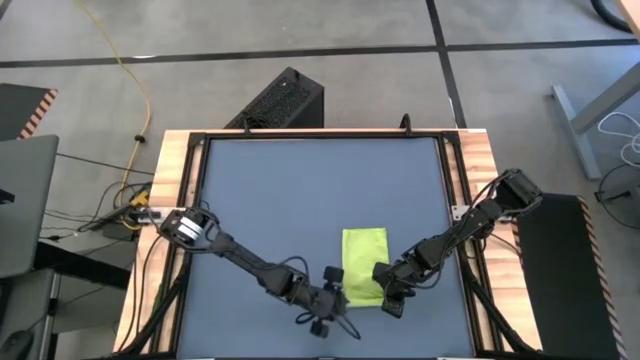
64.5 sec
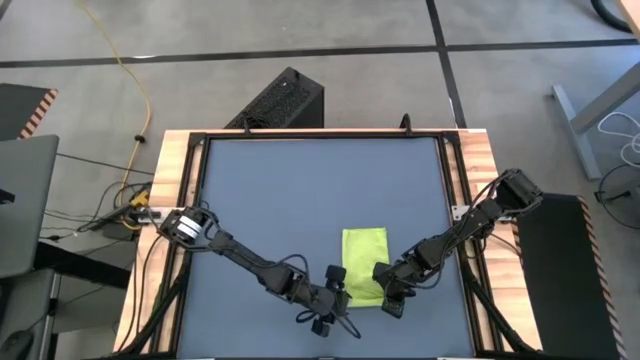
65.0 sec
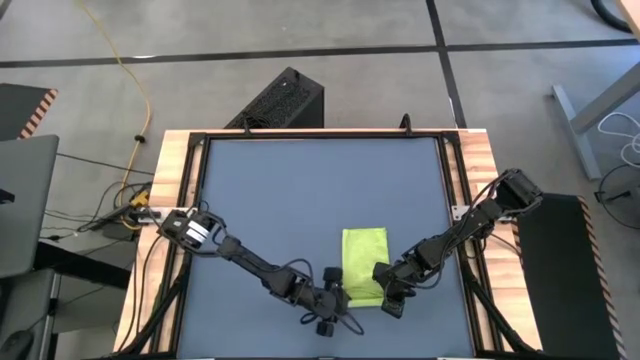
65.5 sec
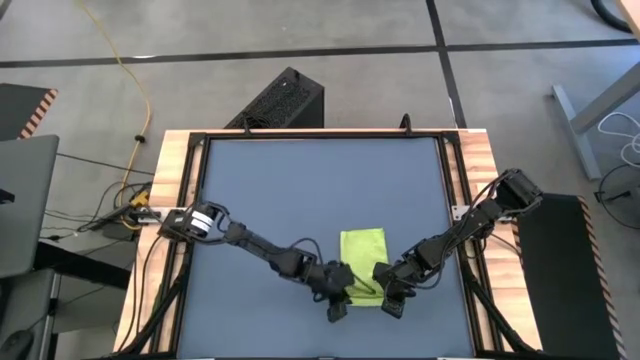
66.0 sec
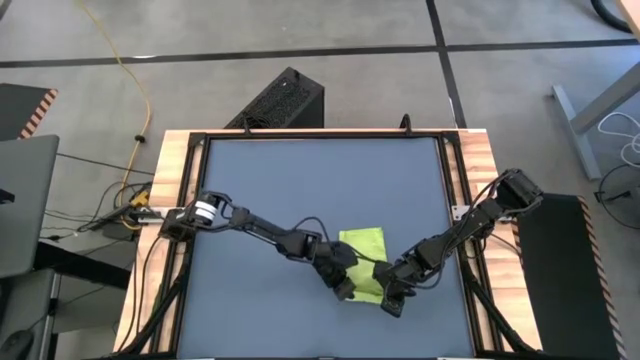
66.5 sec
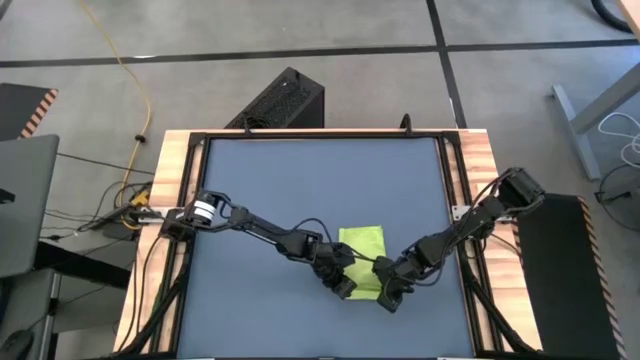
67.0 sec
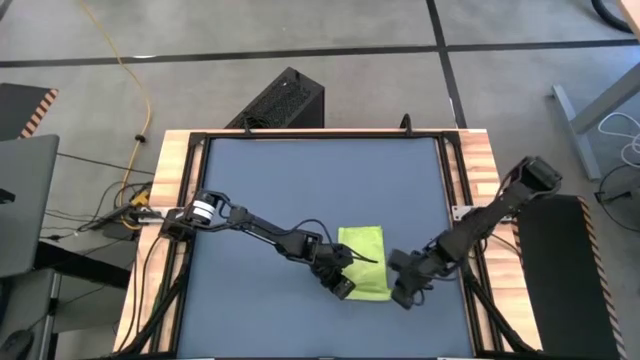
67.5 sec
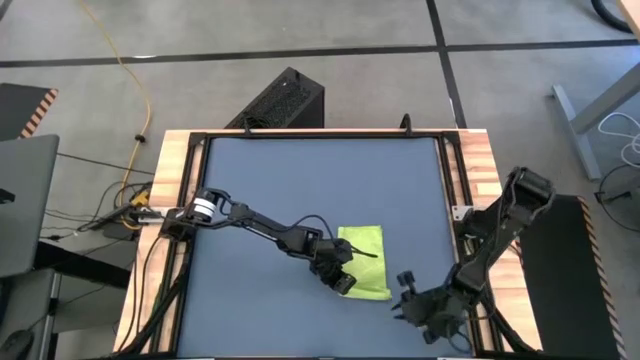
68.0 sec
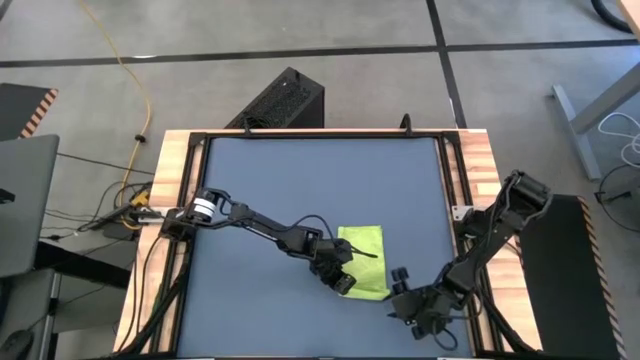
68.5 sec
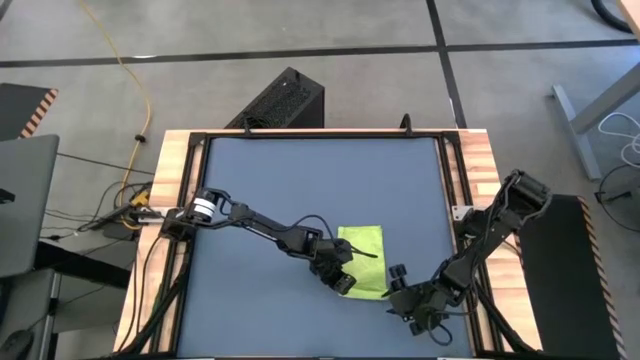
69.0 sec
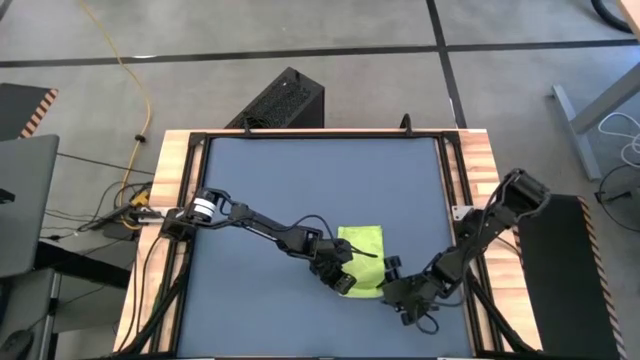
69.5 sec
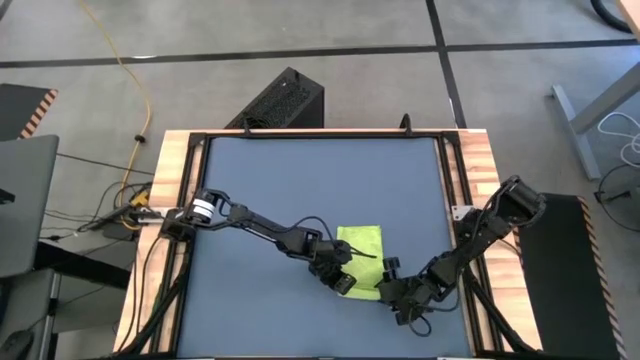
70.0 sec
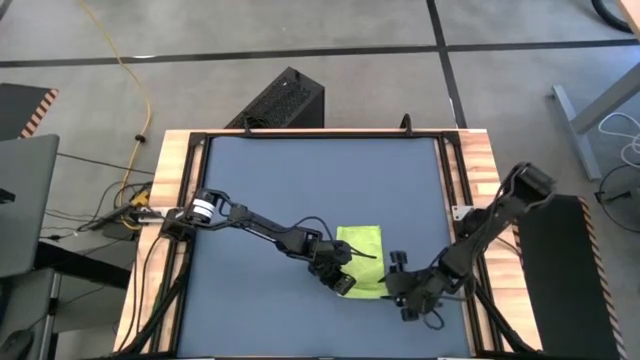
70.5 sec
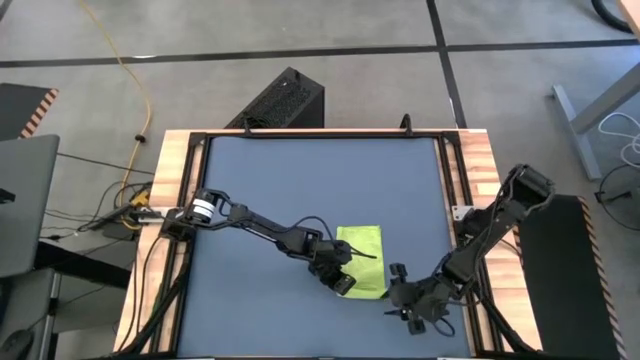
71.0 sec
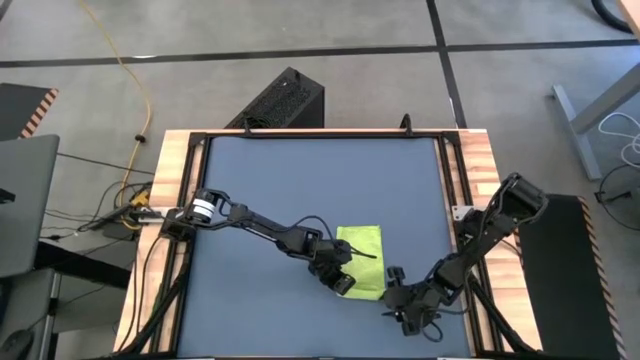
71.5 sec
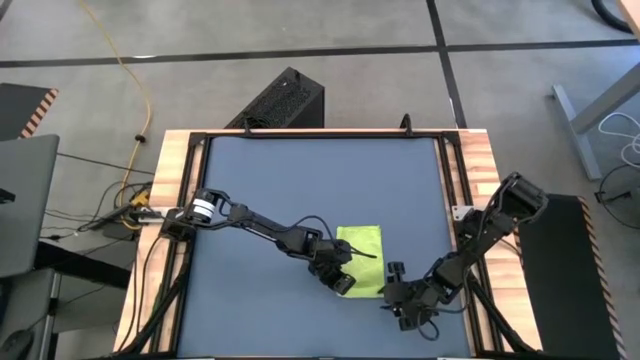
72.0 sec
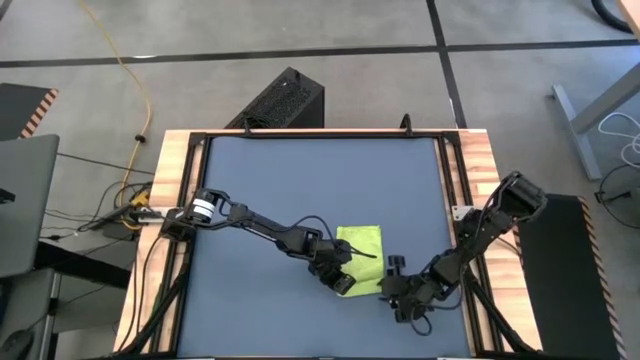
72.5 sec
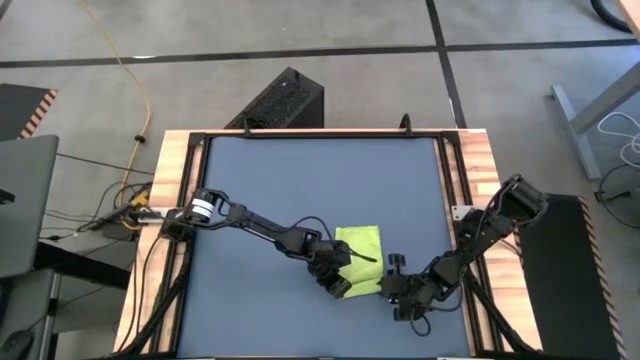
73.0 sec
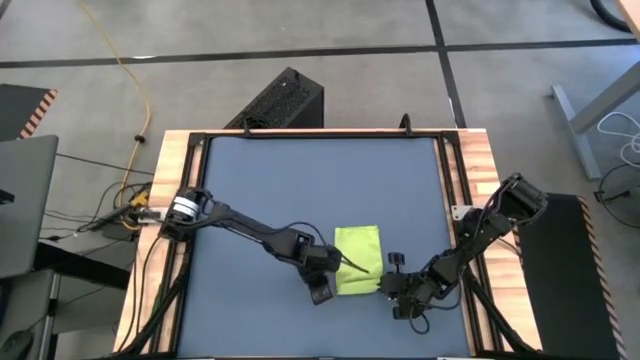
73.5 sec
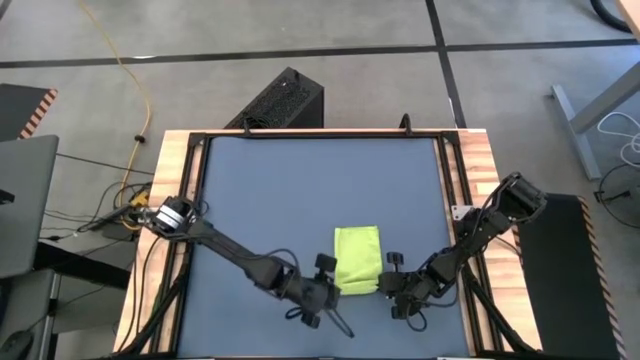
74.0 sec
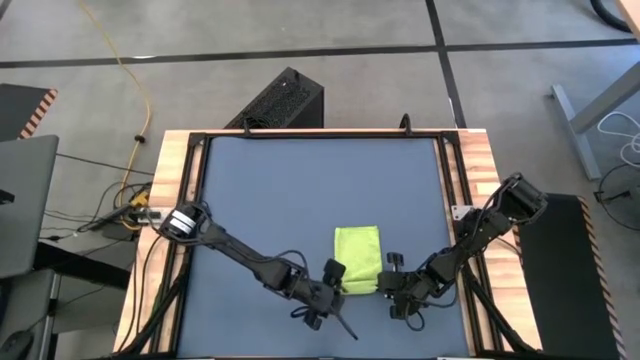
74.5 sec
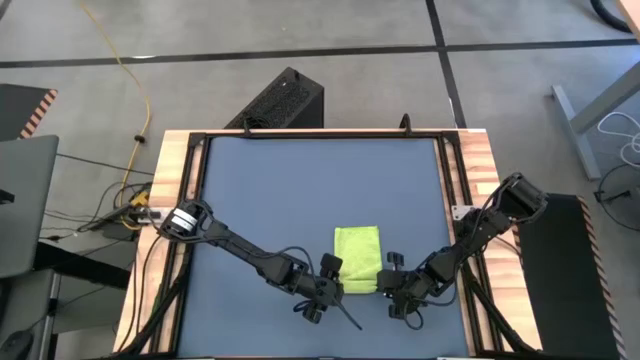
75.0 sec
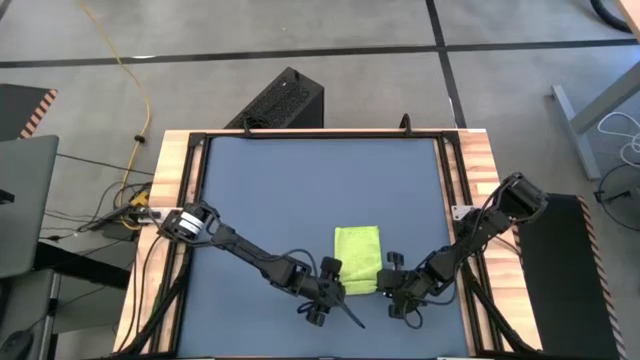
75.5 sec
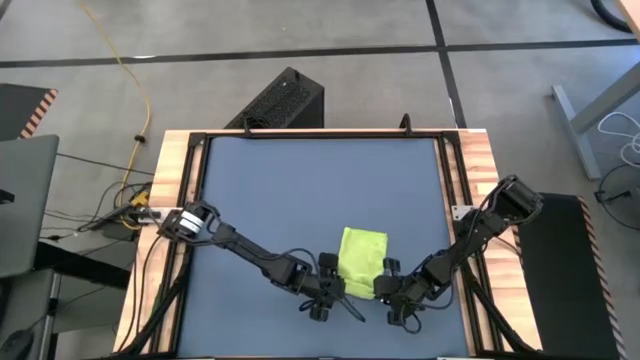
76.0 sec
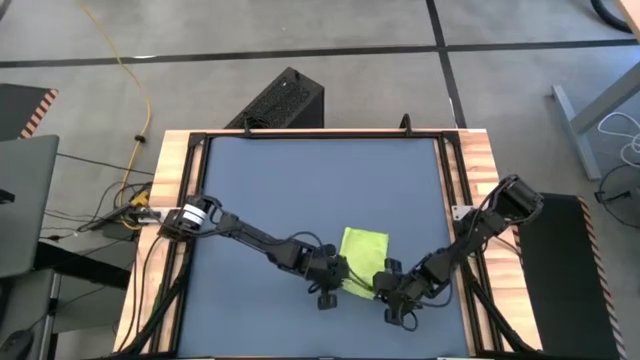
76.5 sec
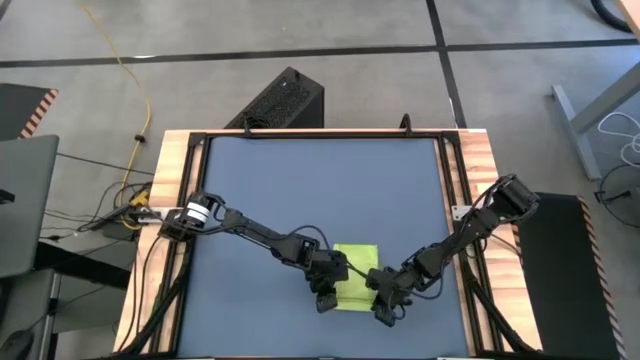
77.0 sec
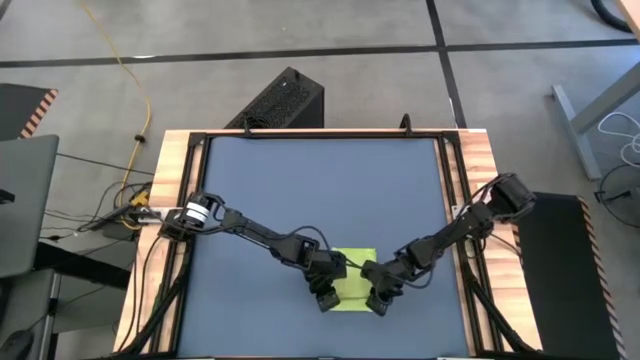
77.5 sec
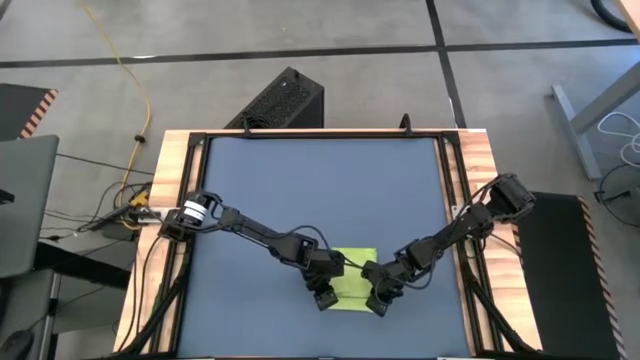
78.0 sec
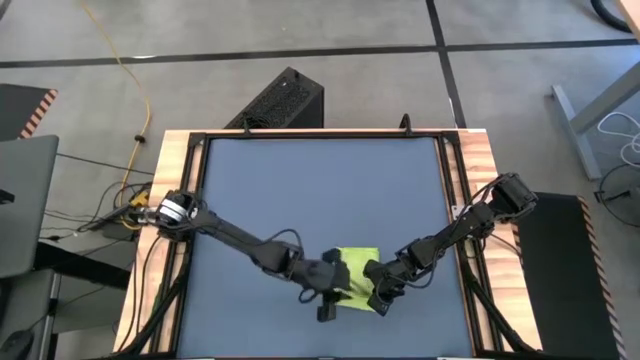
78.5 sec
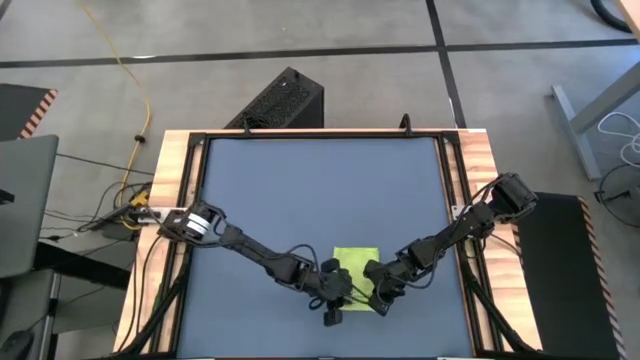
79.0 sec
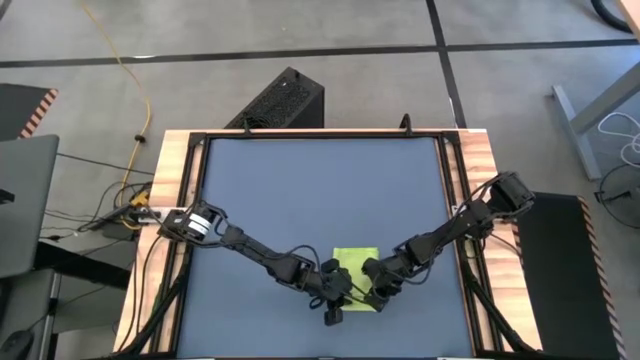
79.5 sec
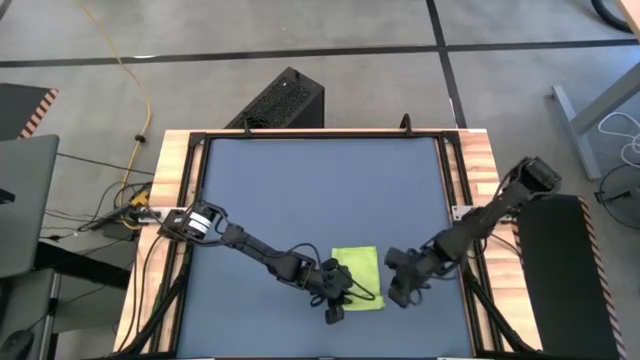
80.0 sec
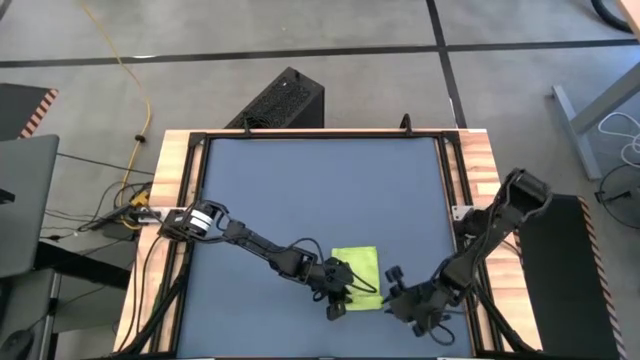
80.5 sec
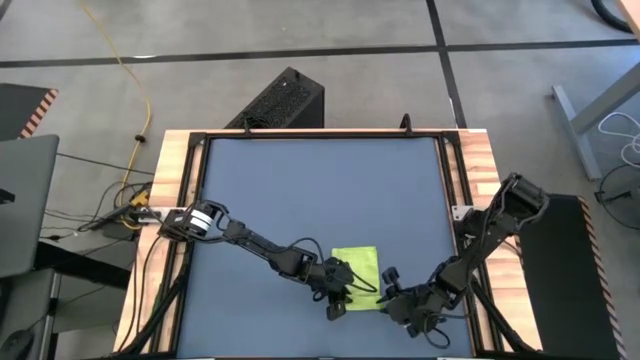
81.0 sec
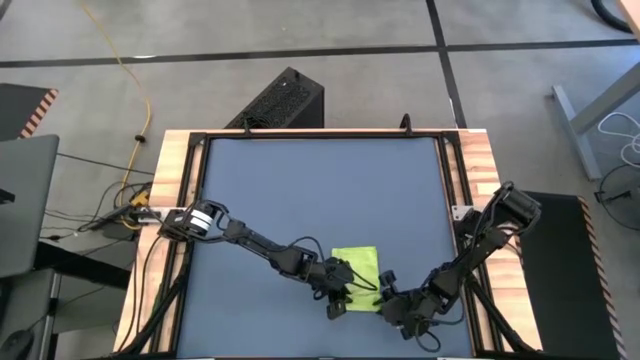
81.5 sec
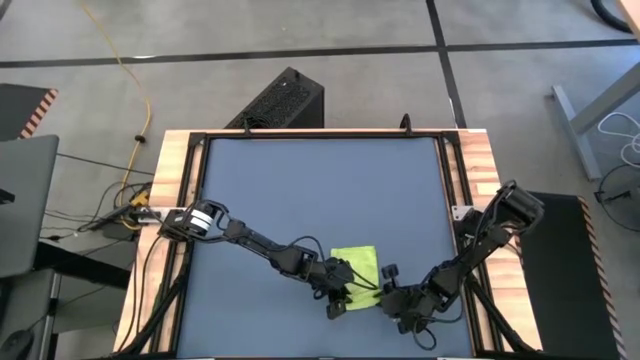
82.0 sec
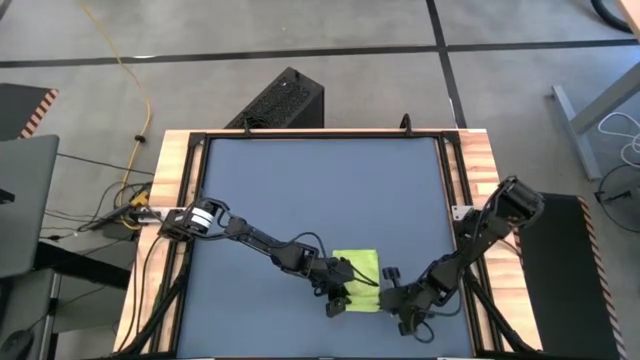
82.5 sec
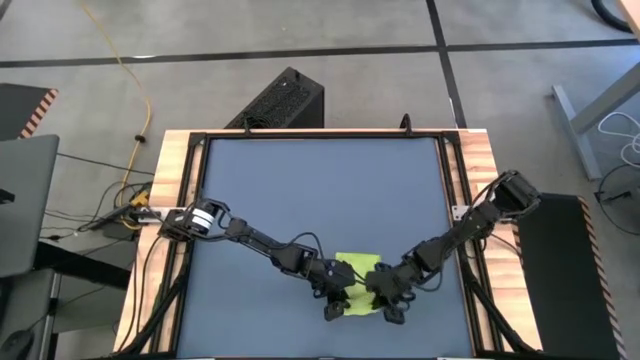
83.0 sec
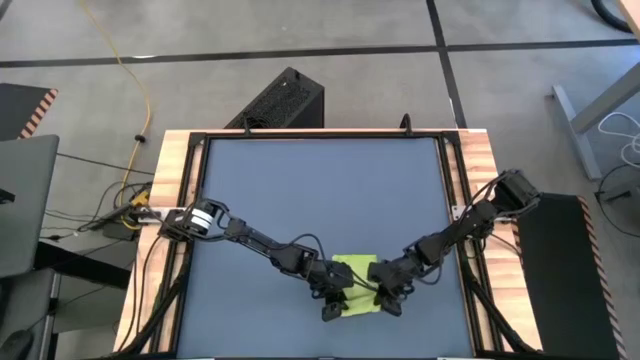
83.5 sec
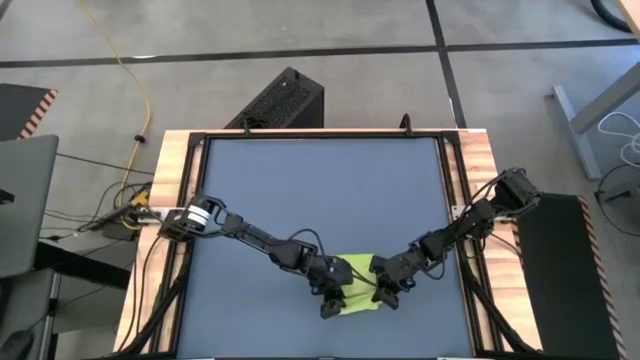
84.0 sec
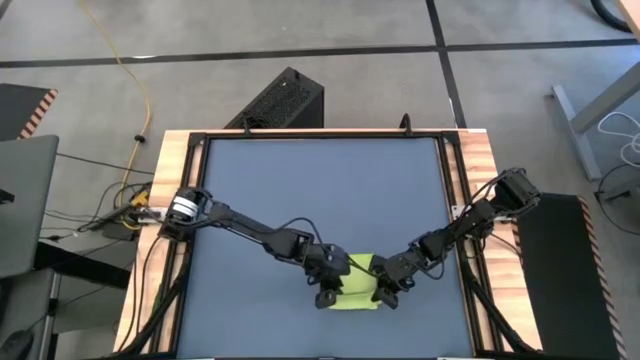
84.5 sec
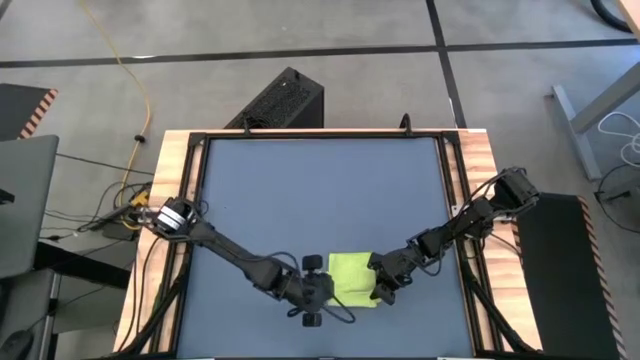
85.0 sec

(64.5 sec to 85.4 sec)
Task: Roll towel into tight, uniform cylinder
Roll the green towel
